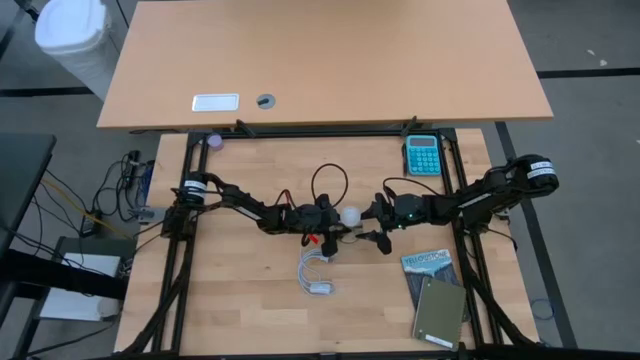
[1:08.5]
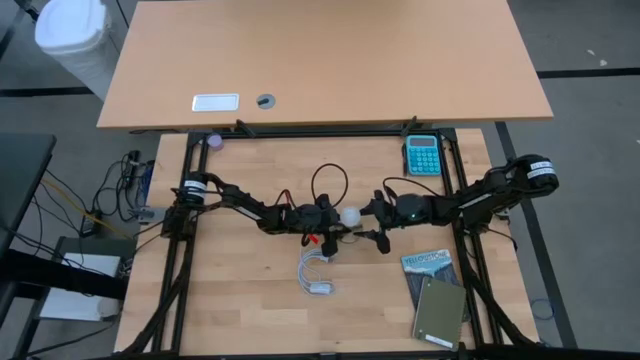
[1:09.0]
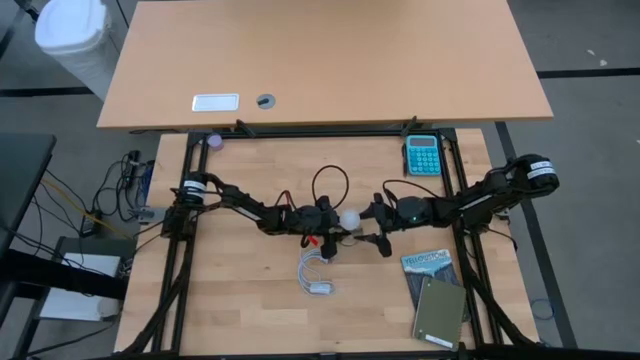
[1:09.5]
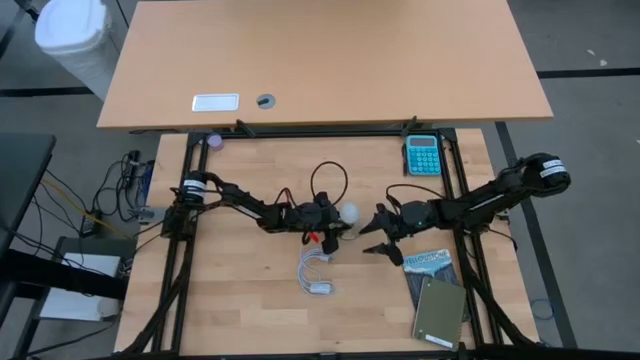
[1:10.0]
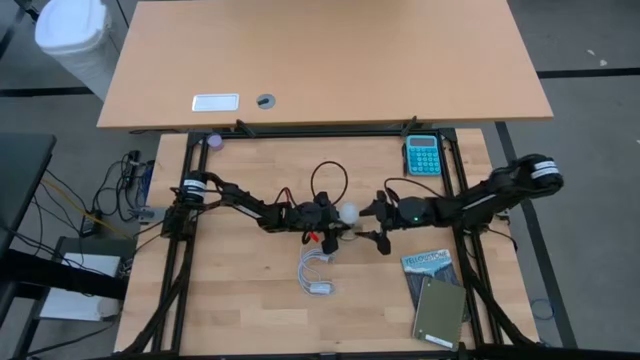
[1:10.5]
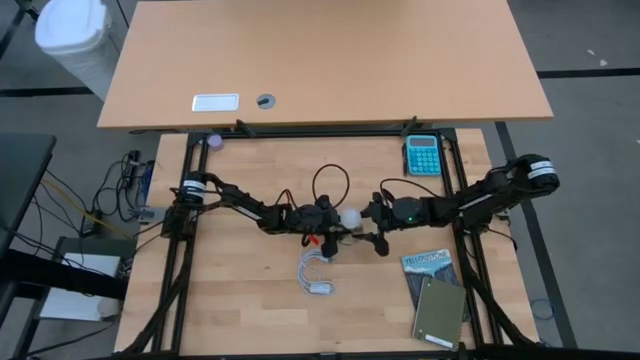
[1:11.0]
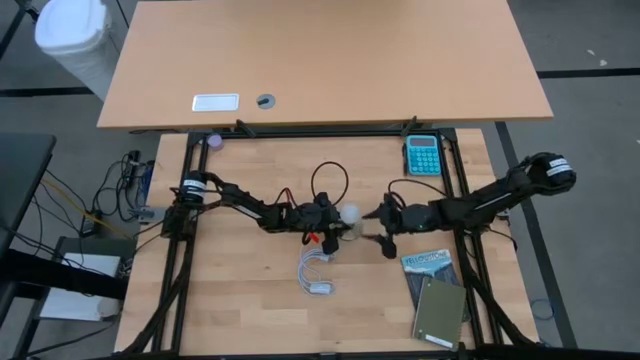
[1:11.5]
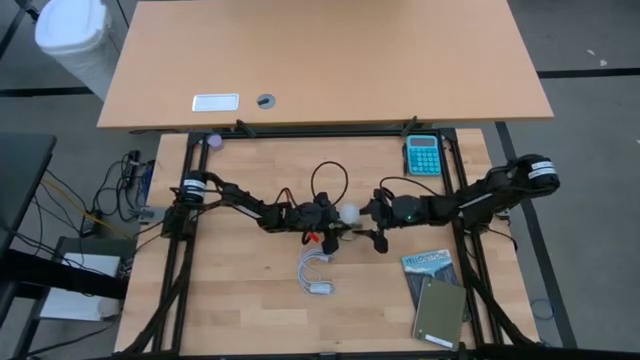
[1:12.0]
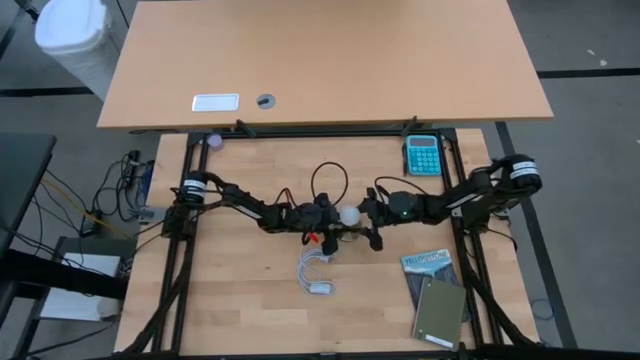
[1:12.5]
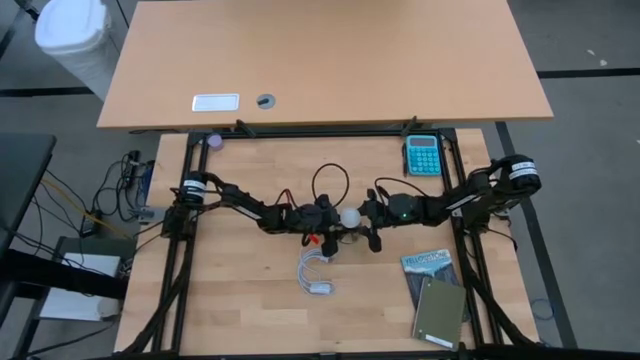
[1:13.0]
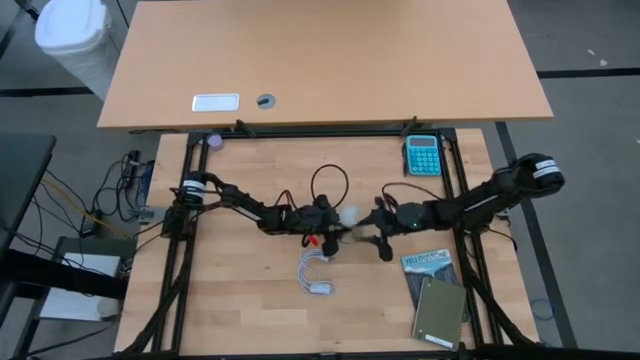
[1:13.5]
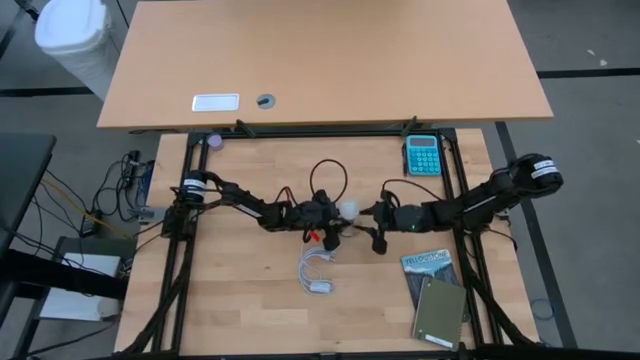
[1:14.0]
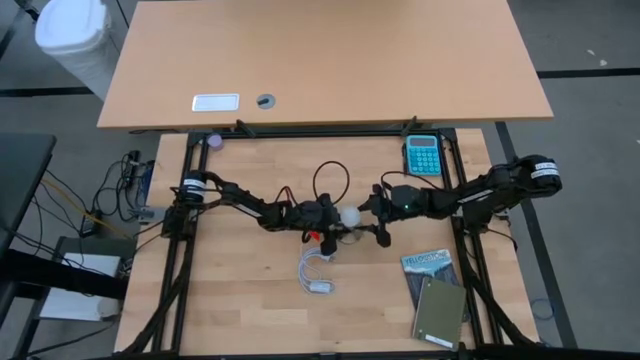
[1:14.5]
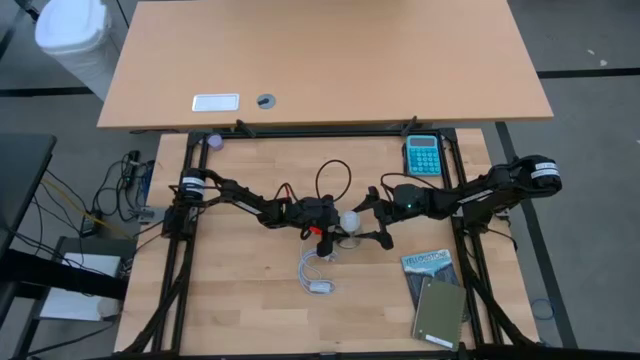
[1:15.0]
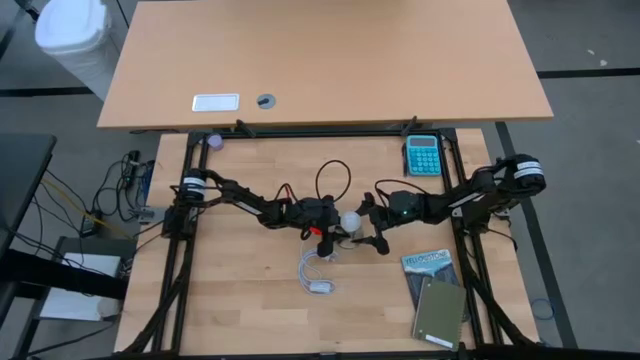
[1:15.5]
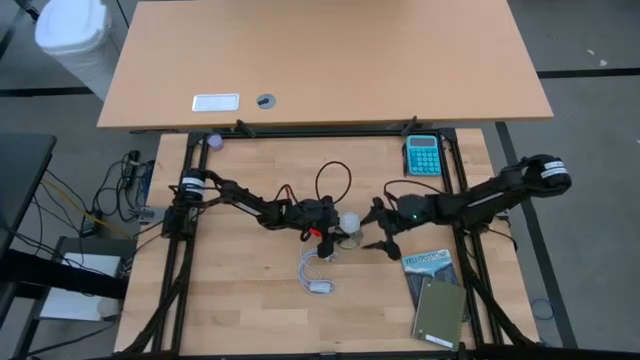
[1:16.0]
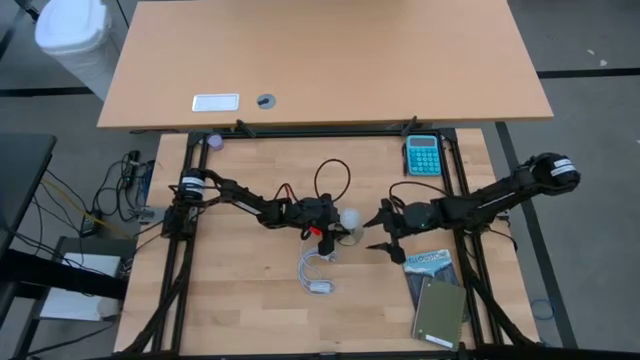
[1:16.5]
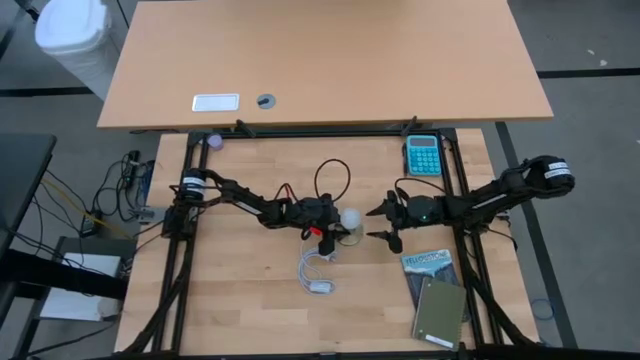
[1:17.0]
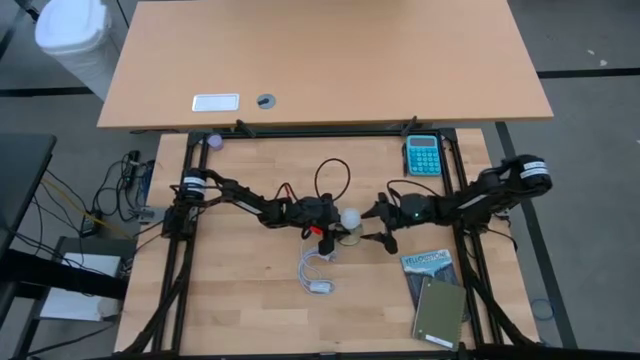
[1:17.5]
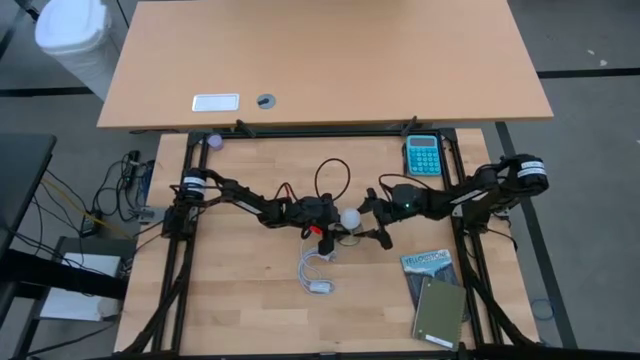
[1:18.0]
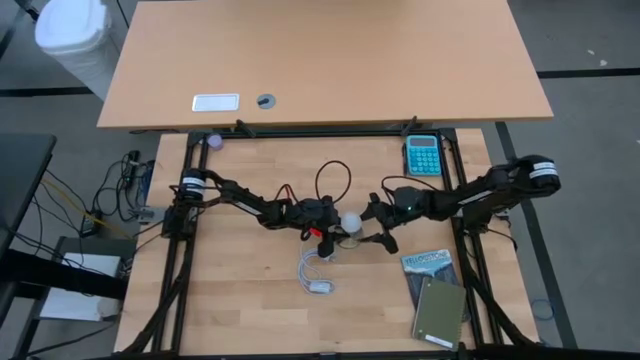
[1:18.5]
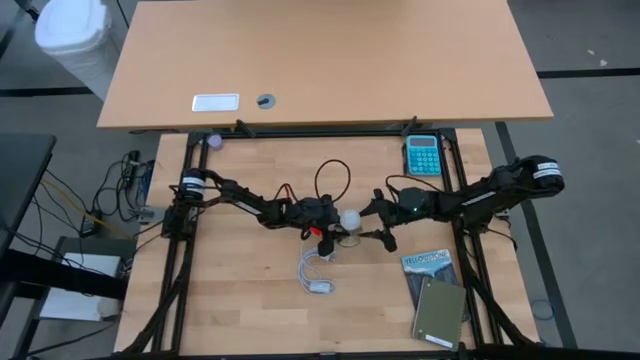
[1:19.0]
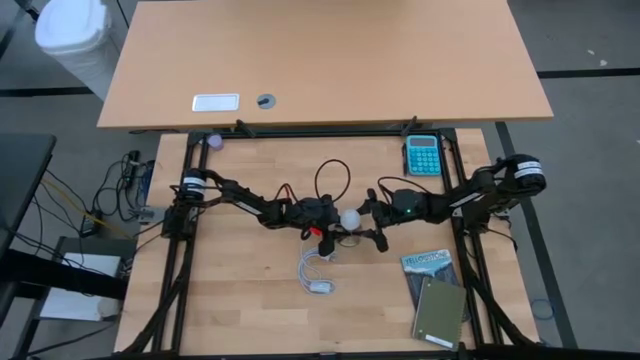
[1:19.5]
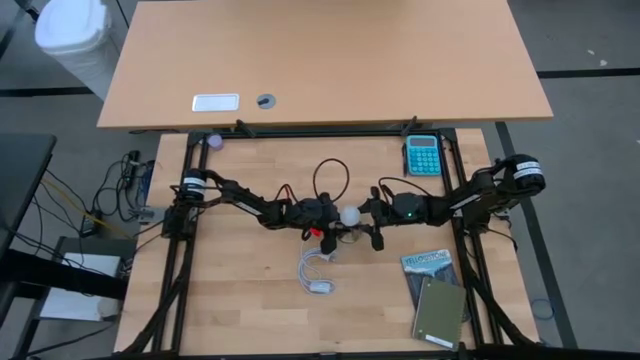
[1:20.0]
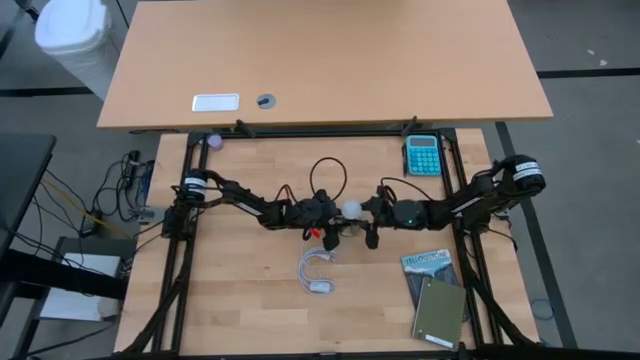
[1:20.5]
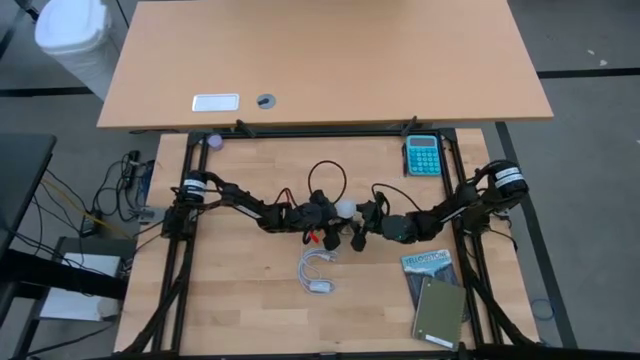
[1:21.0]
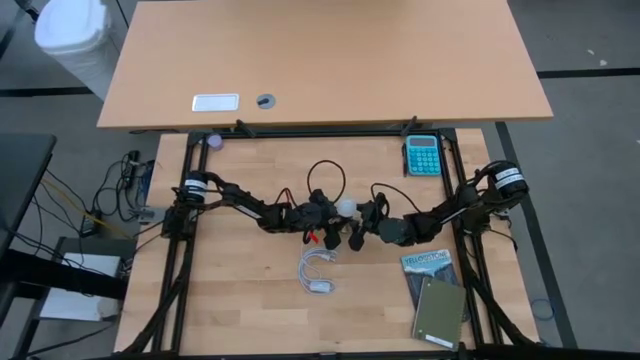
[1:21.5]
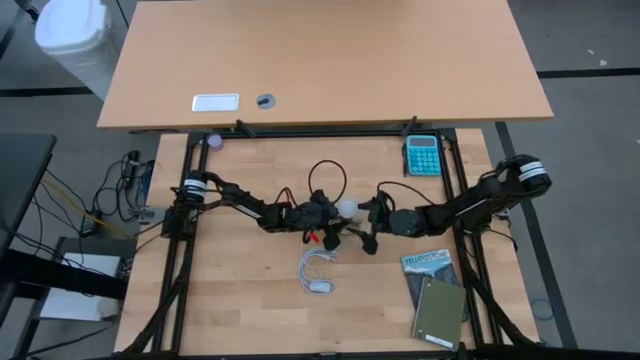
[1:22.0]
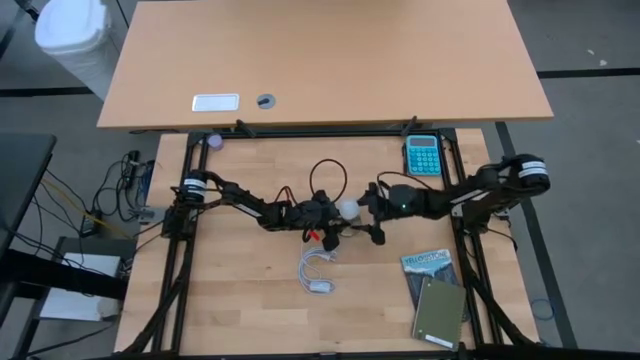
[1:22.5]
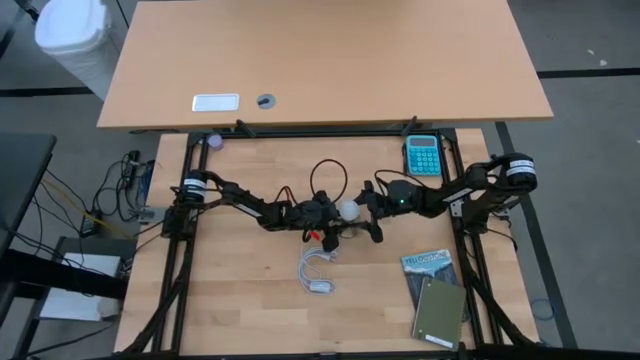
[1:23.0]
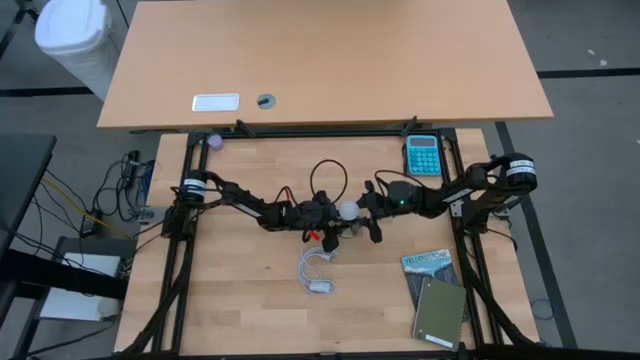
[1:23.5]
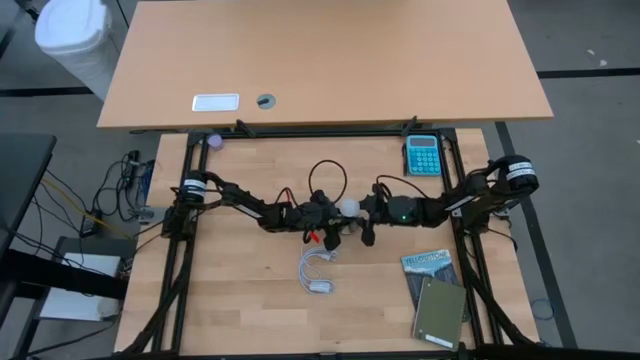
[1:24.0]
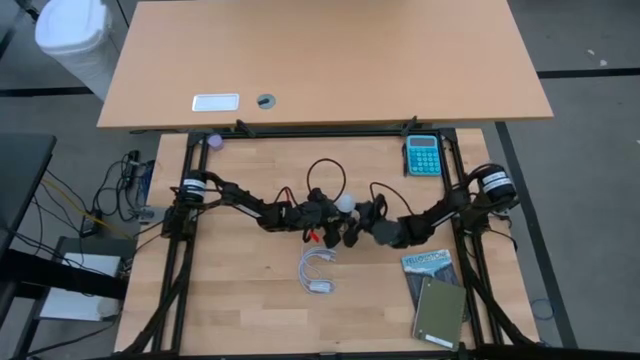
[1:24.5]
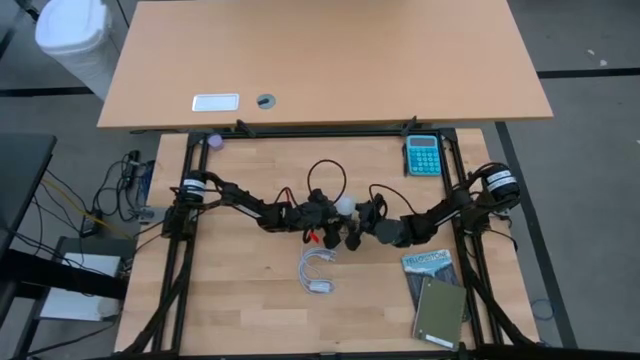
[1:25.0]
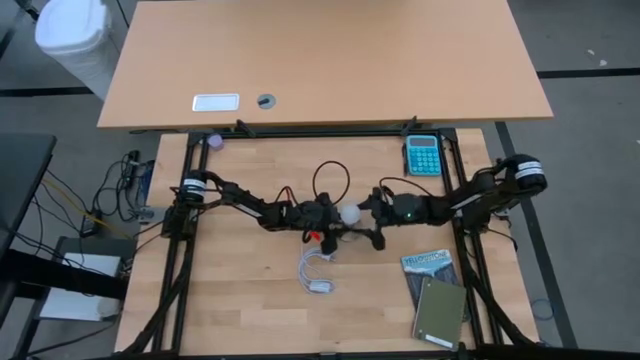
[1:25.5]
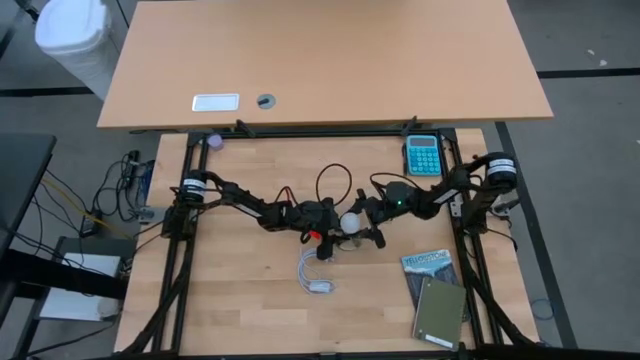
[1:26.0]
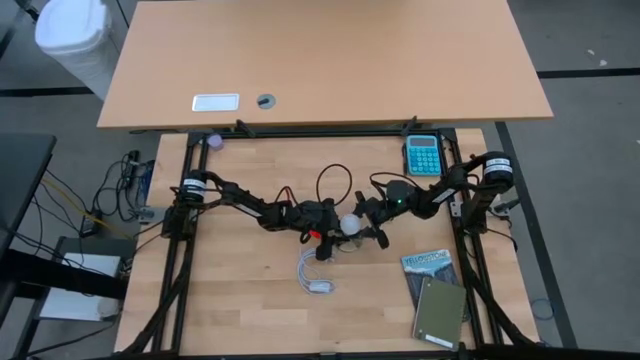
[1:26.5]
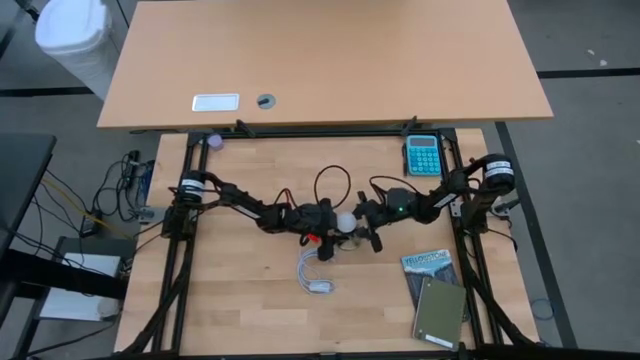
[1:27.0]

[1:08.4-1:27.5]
Task: Screw lightbulb
Insert the lightbulb into the desk lamp

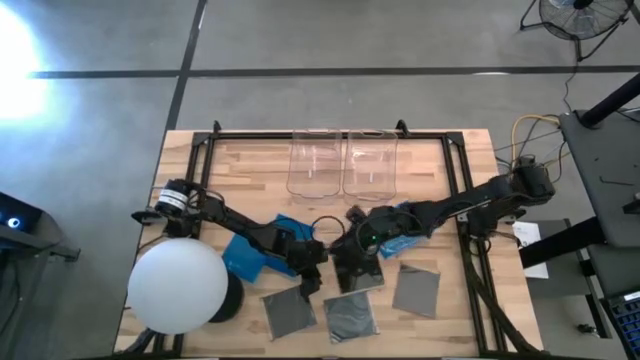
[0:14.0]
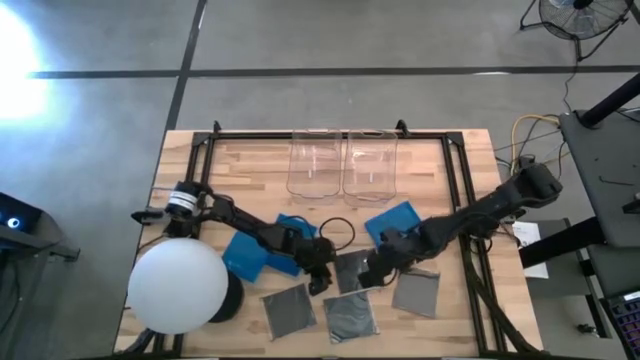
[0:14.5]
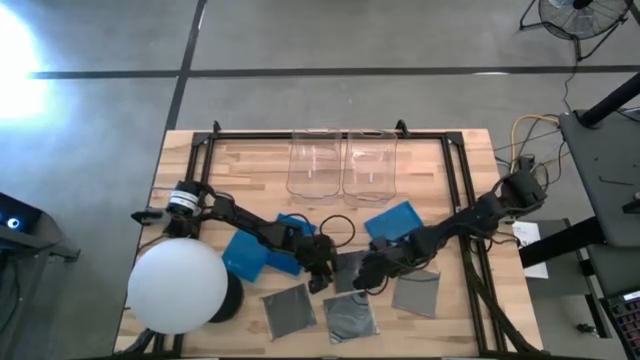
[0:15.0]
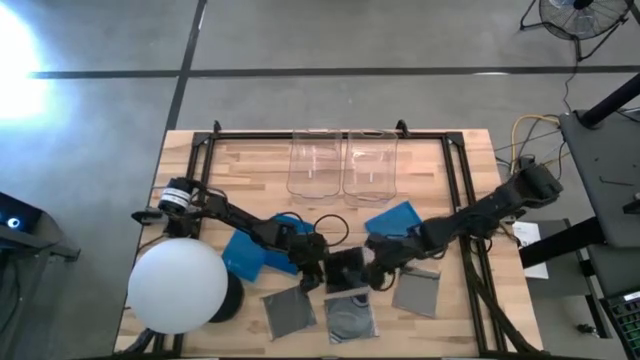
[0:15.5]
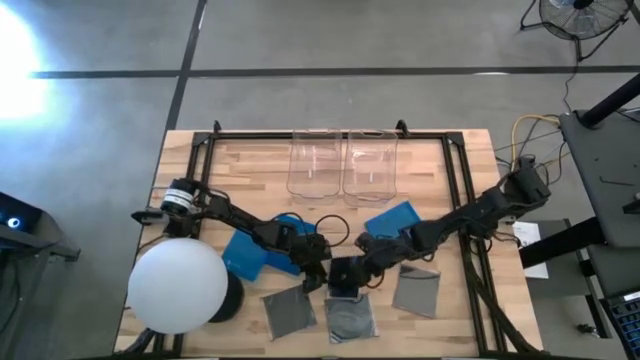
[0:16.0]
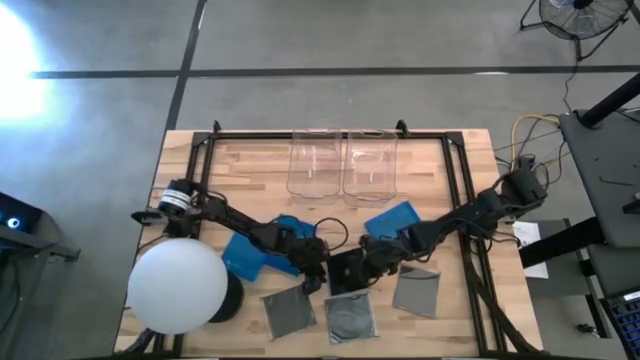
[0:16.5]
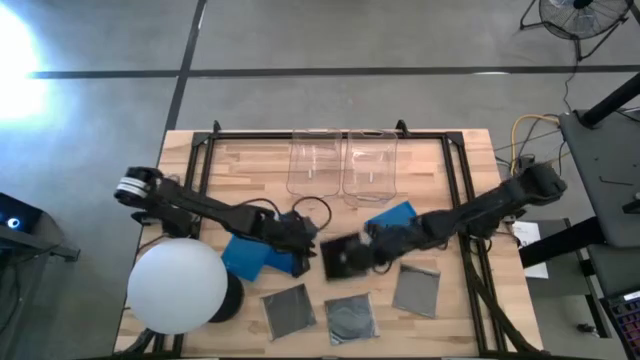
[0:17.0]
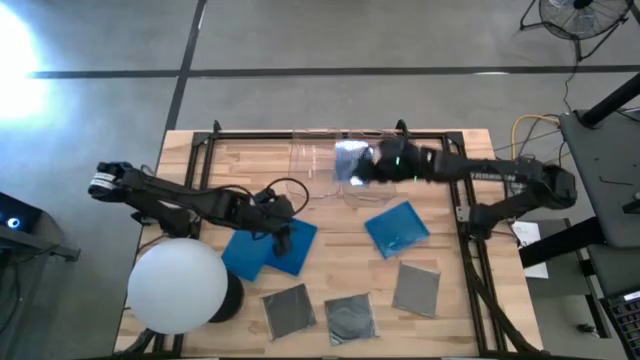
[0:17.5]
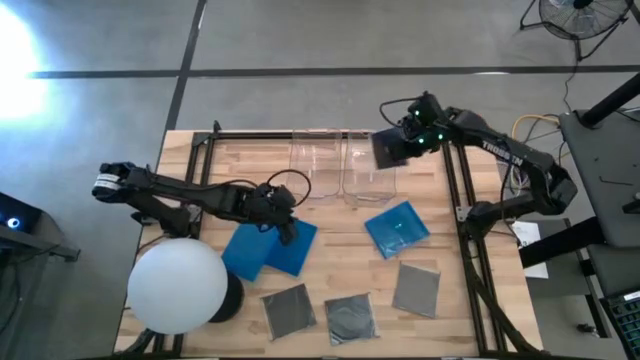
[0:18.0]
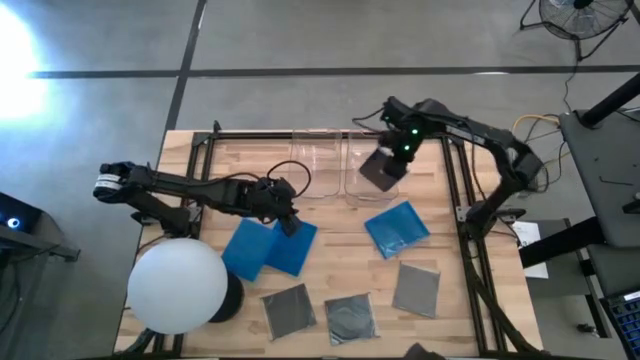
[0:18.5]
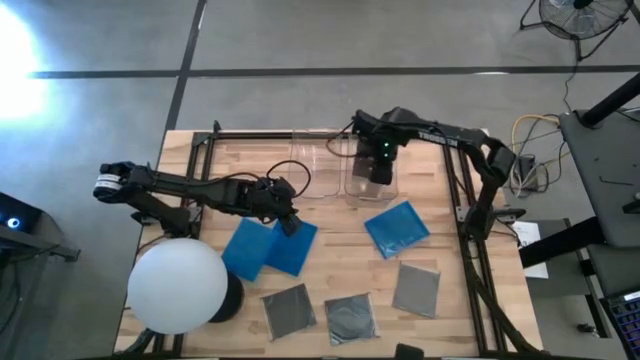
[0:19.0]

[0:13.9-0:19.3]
Task: Pick & place jewel cases by type
Put the black CD case into the right transparent bin
